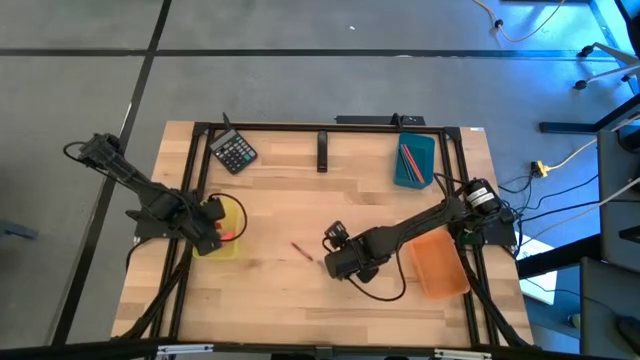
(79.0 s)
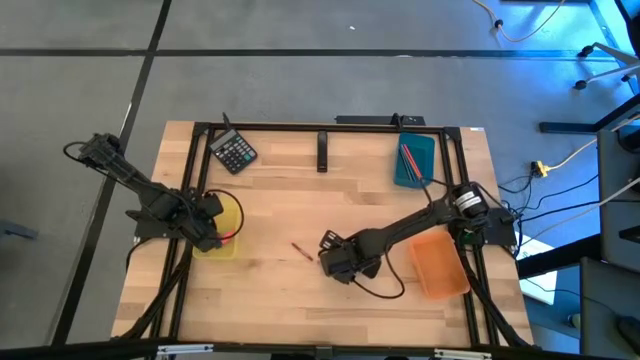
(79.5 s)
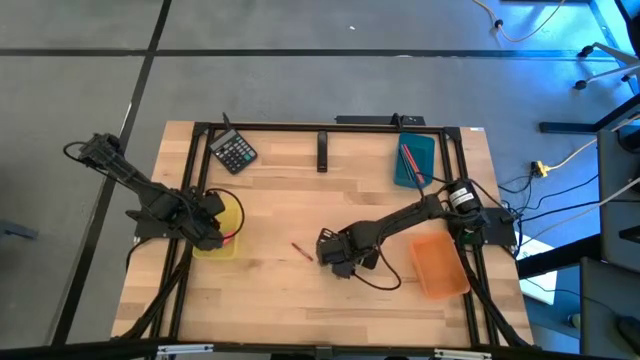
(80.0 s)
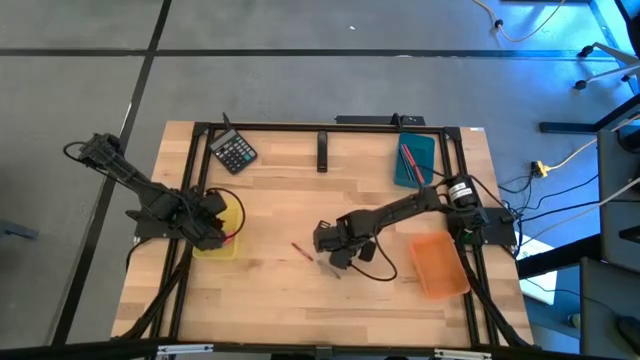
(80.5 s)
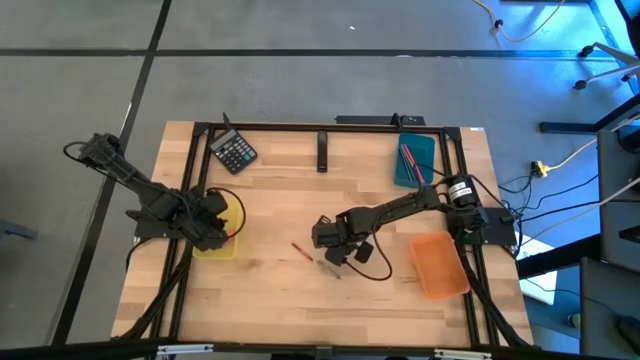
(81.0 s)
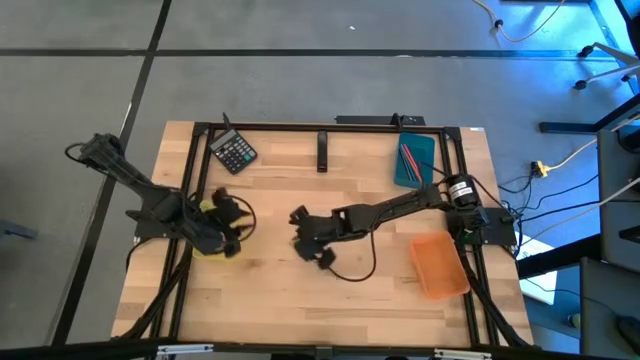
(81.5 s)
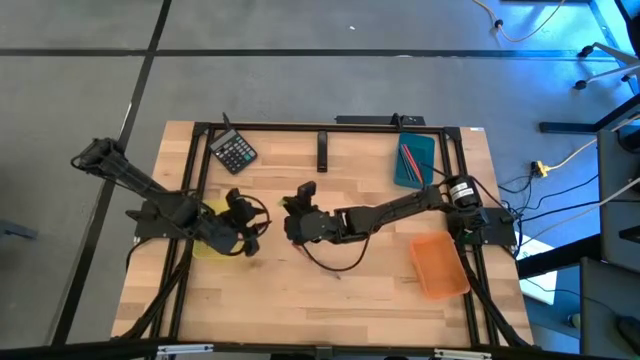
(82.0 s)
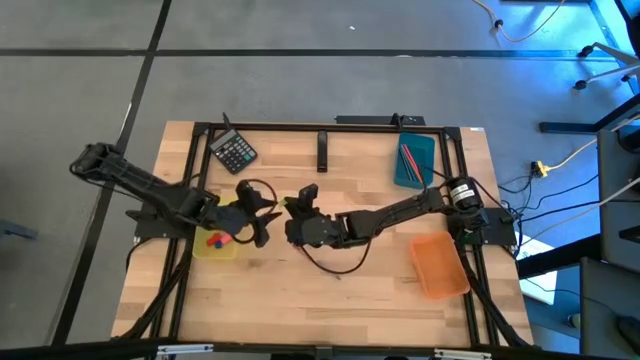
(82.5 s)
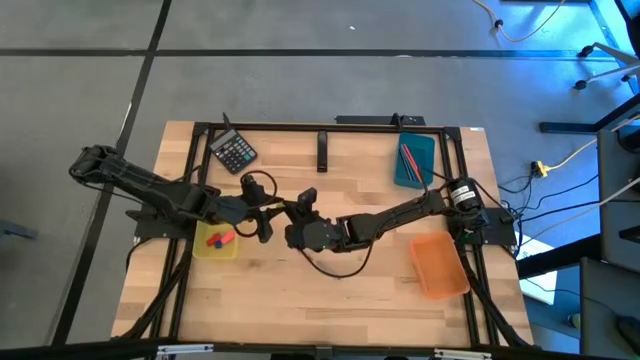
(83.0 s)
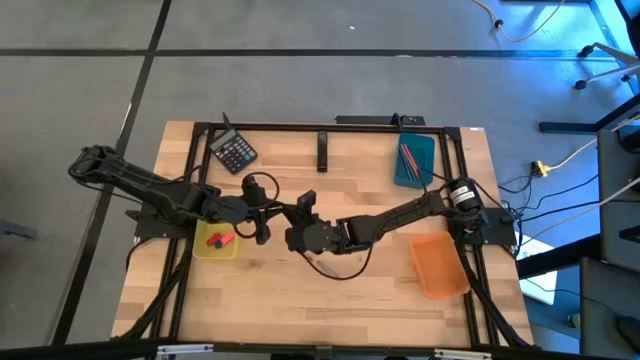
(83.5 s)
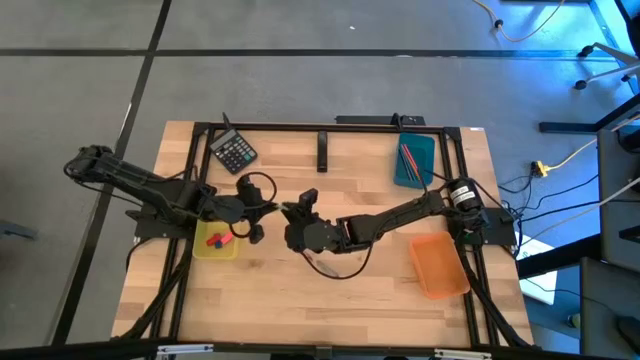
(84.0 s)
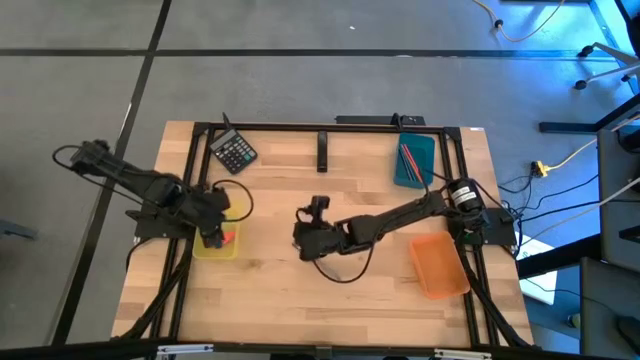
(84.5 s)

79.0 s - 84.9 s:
Task: Sort crayons/erasers/pens/pencils in bins
Put the light green eraser into the yellow bin

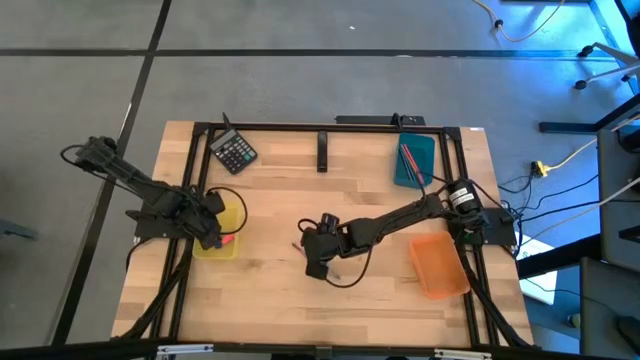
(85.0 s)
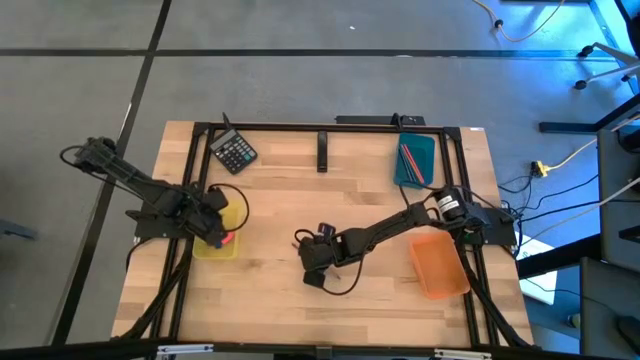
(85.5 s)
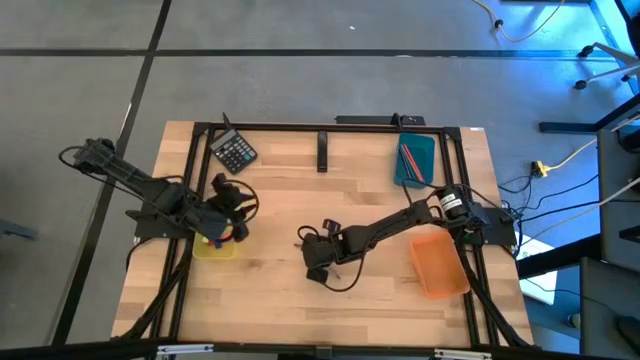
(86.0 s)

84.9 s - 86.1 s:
Put the red crayon into the orange bin

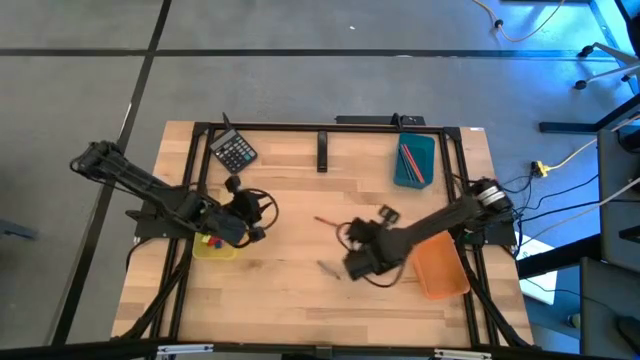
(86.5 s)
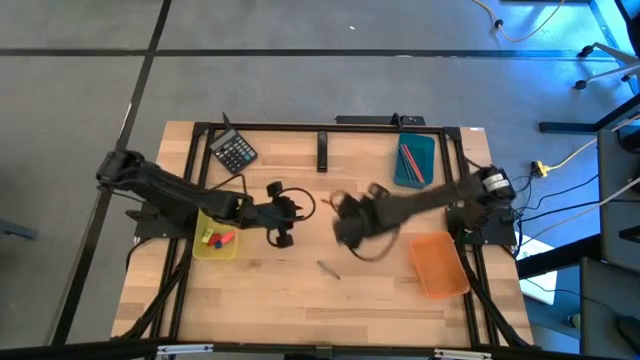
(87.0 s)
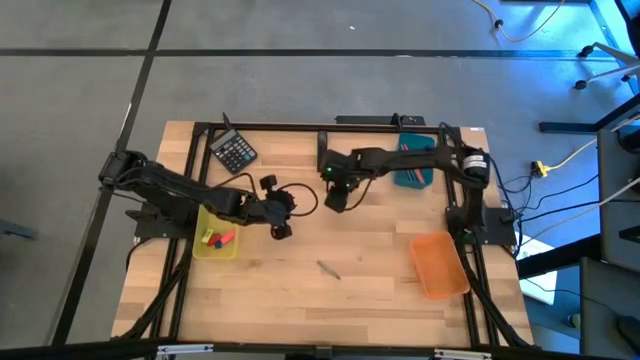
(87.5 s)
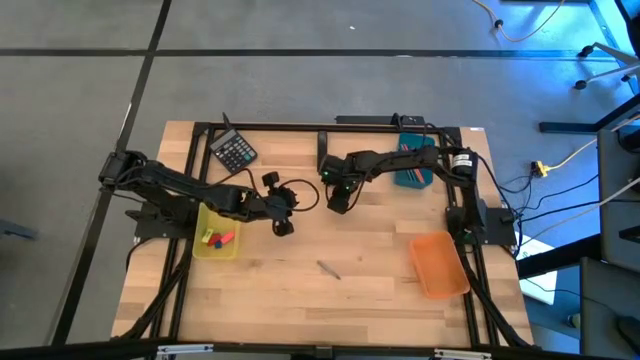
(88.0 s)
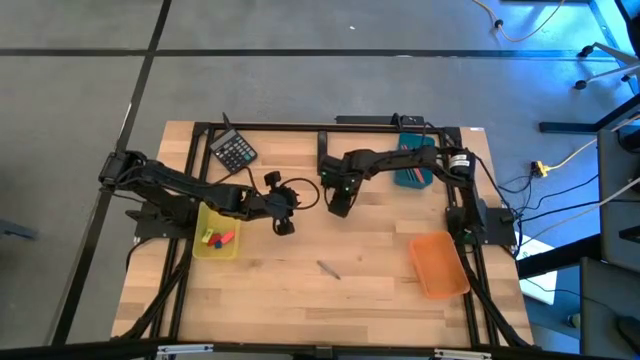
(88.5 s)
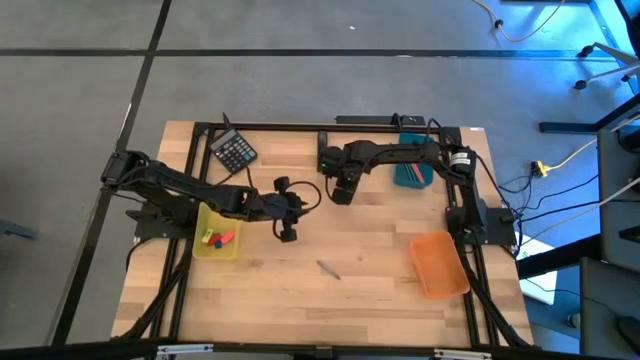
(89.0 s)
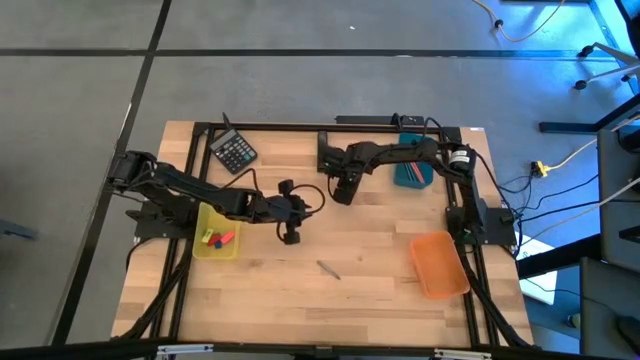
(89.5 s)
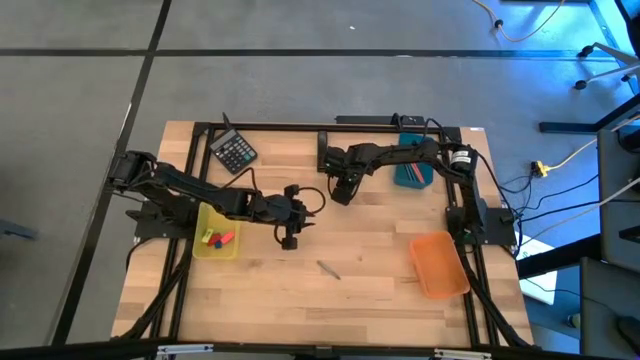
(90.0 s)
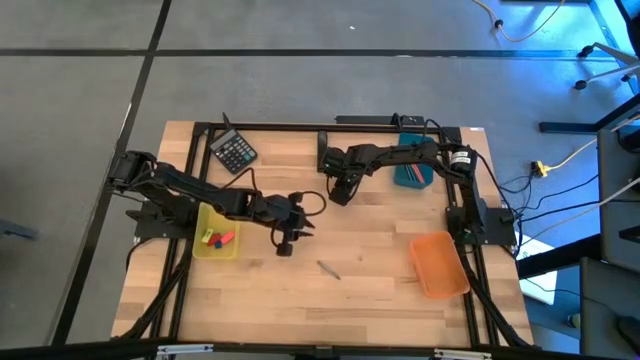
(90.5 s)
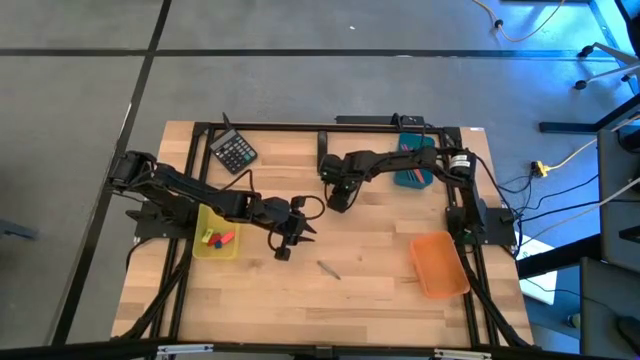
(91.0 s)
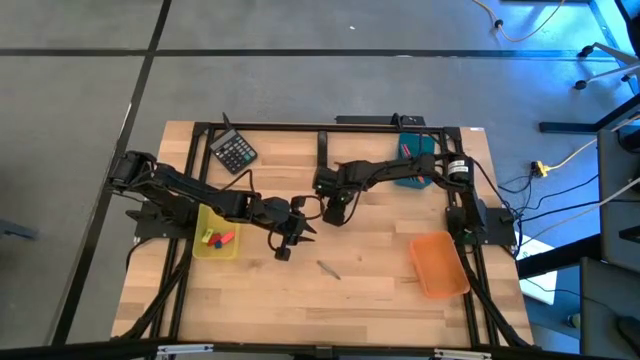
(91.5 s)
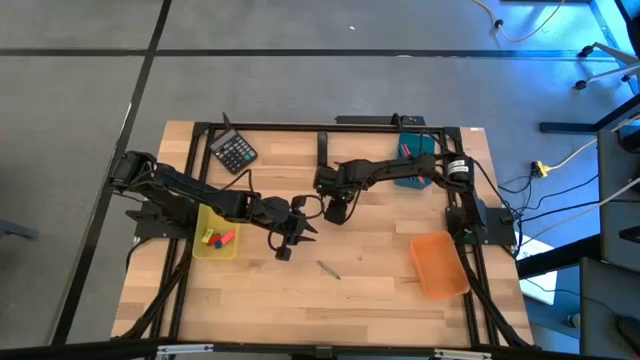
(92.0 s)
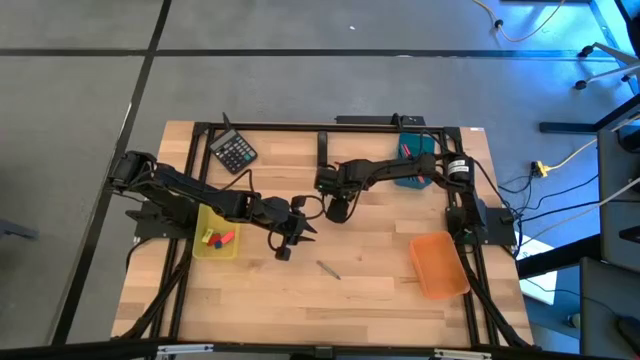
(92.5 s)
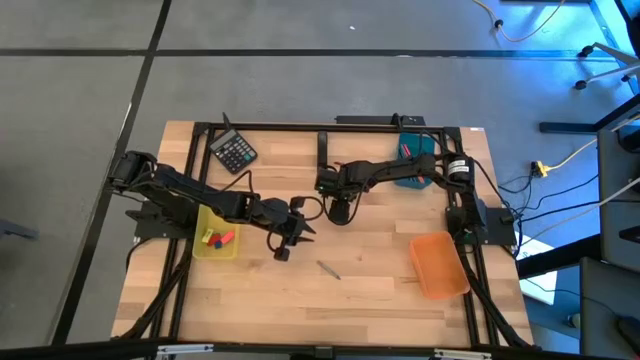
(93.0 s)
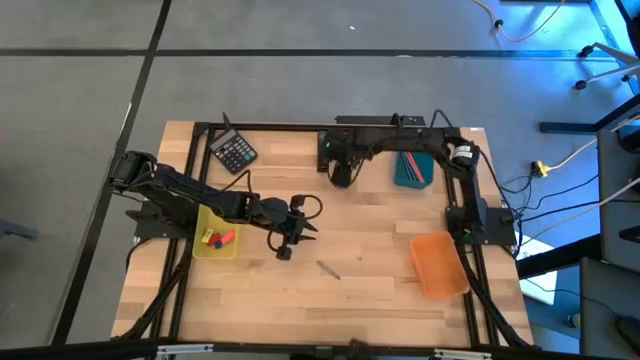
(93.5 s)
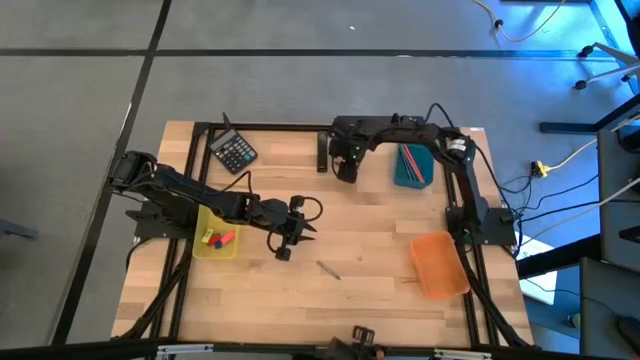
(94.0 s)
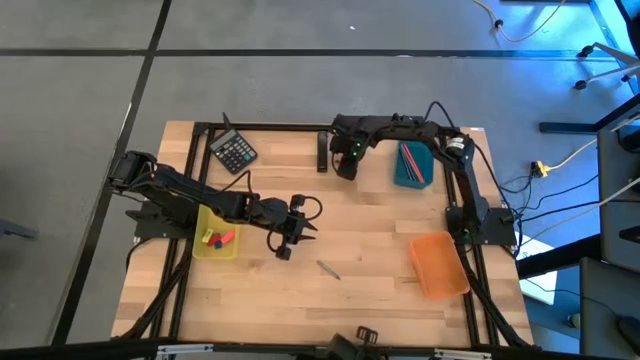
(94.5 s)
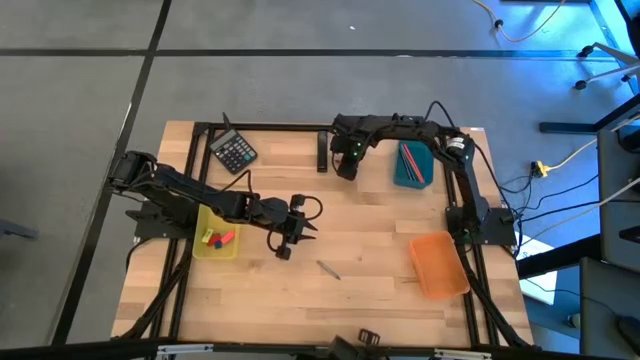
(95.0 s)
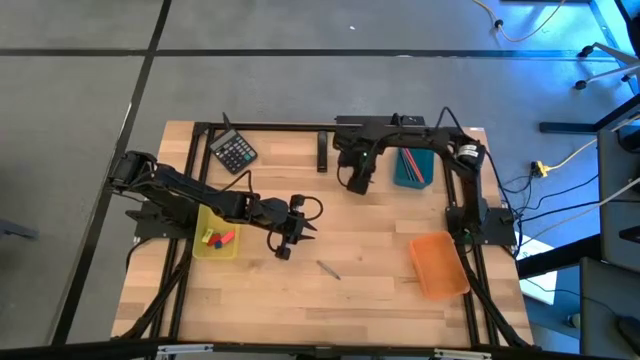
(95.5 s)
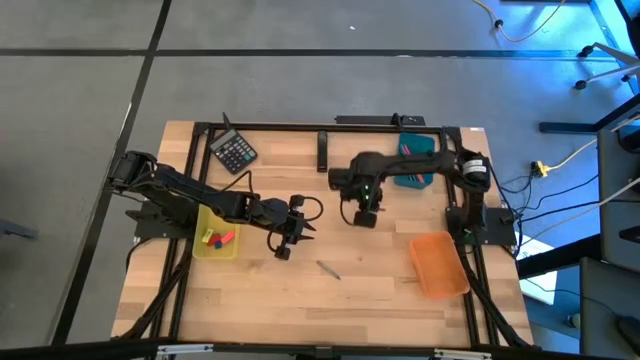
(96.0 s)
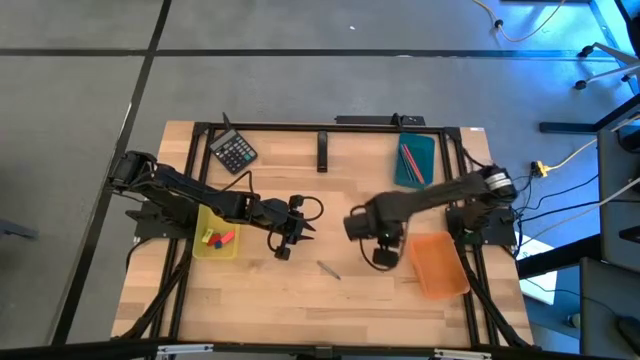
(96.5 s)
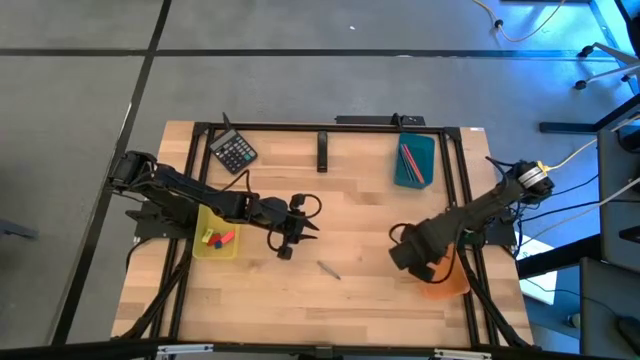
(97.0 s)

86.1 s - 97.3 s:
Put the red crayon into the orange bin

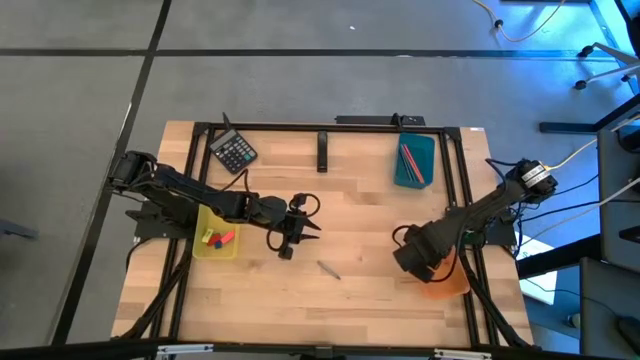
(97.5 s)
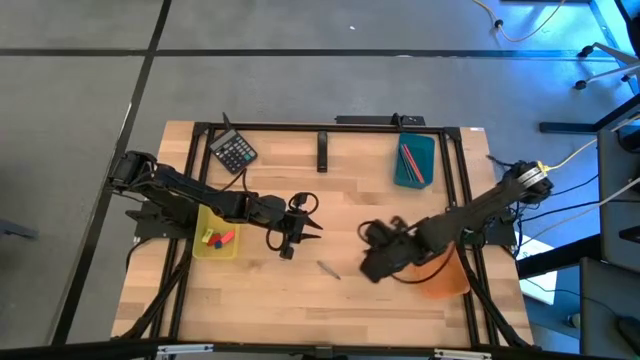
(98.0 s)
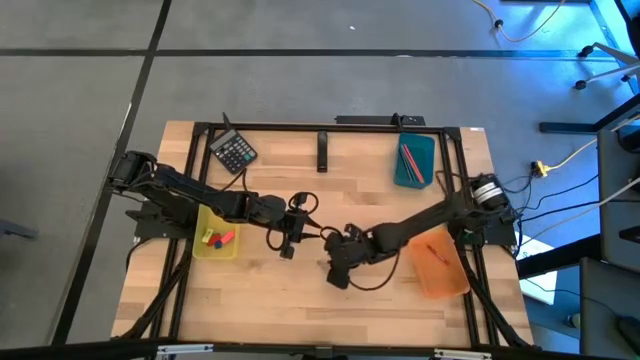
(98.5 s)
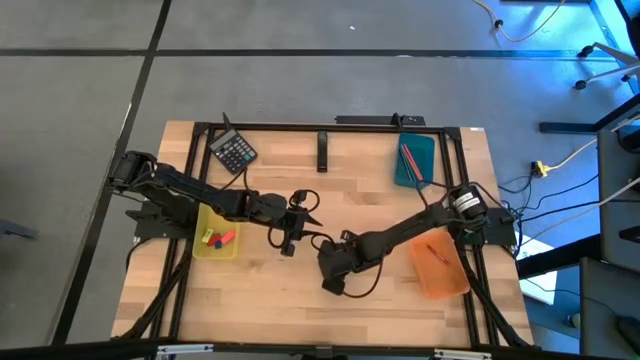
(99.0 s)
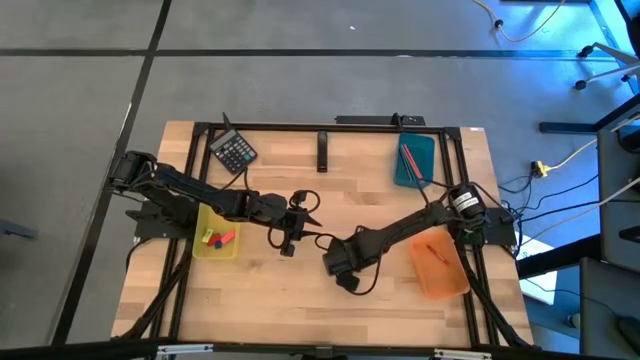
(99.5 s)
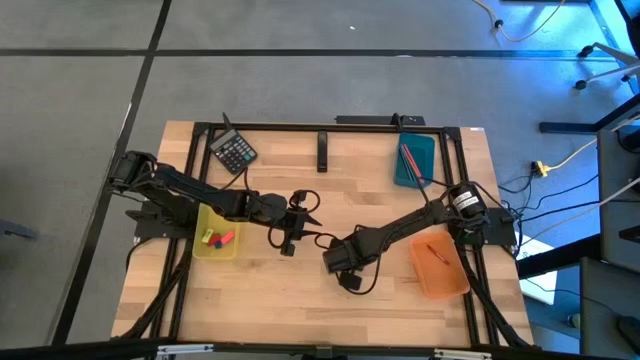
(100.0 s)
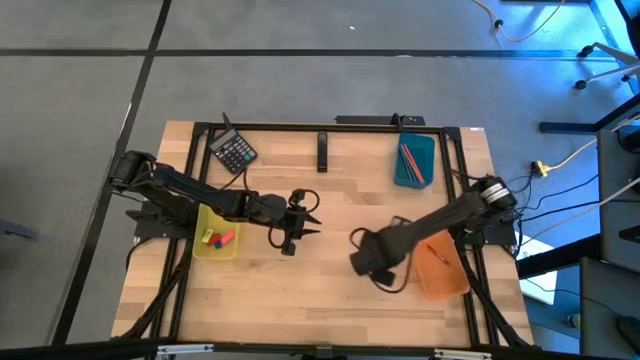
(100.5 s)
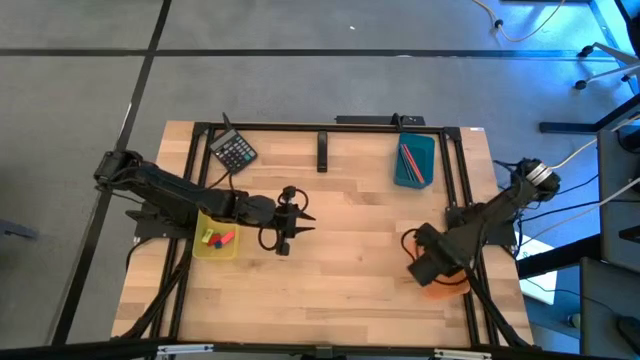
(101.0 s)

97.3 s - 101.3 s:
Put the gray crayon into the orange bin
